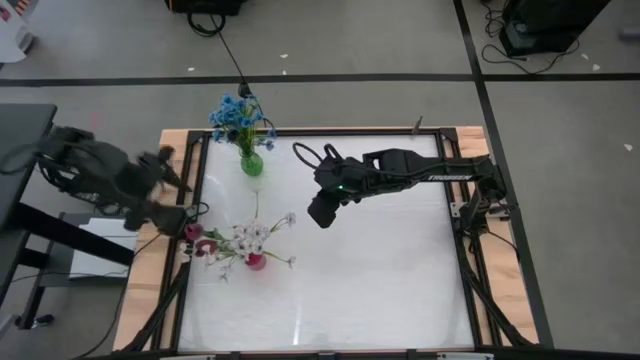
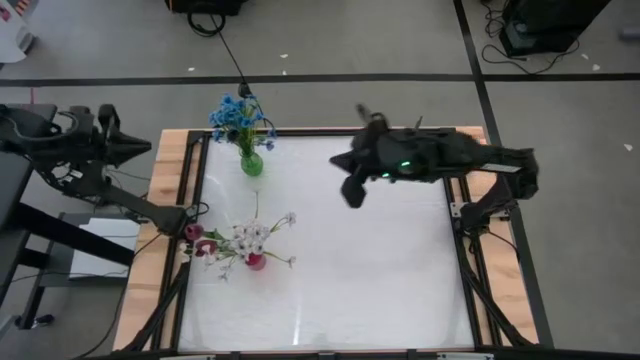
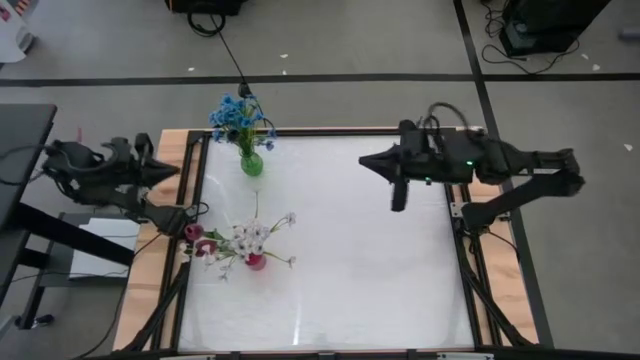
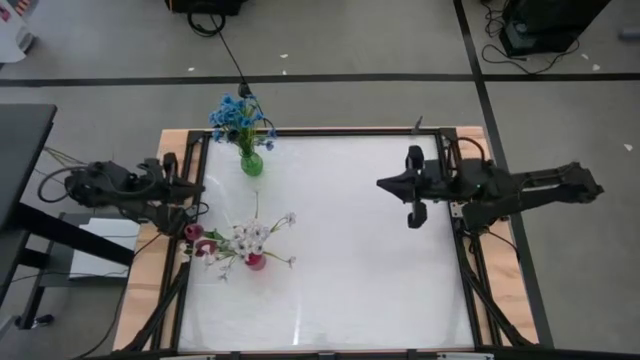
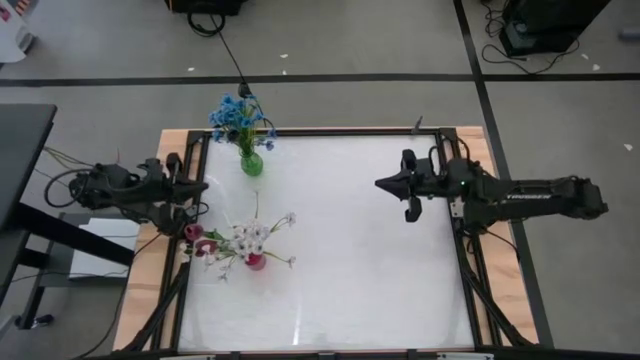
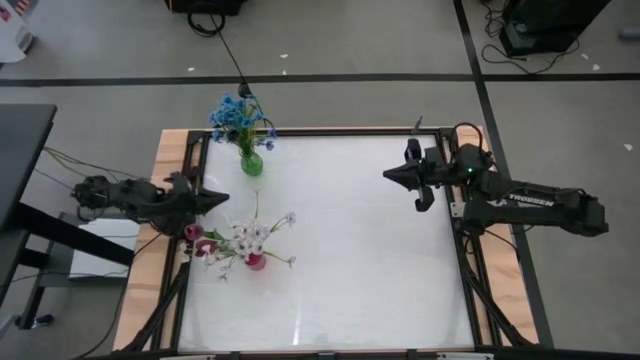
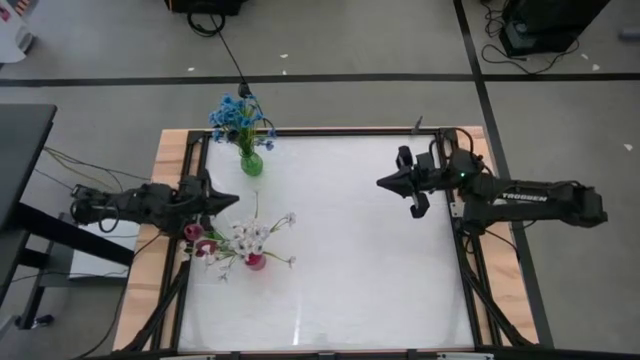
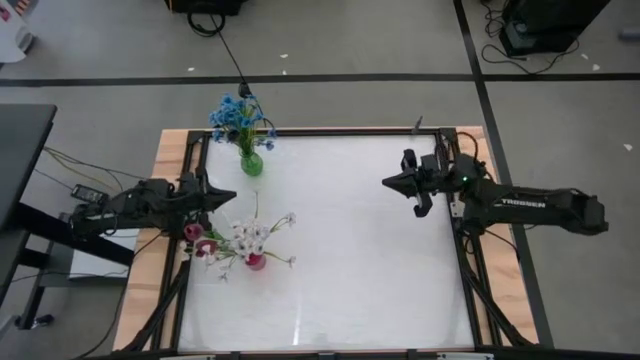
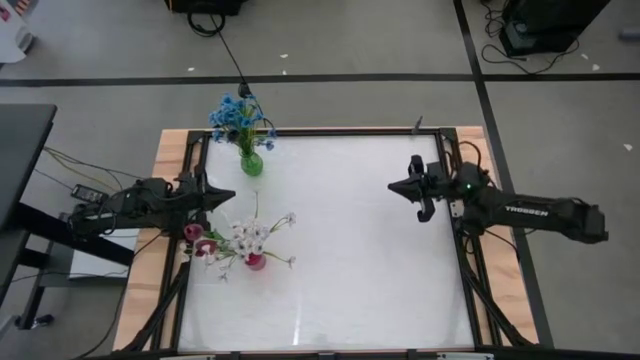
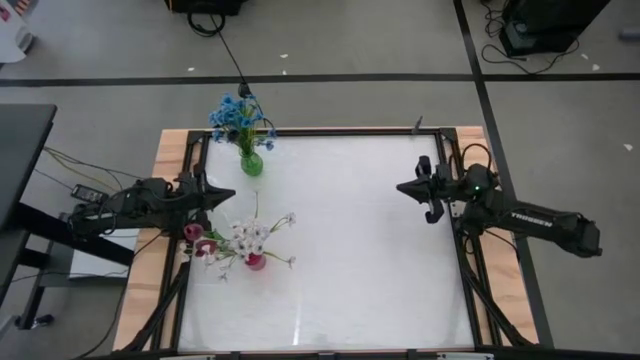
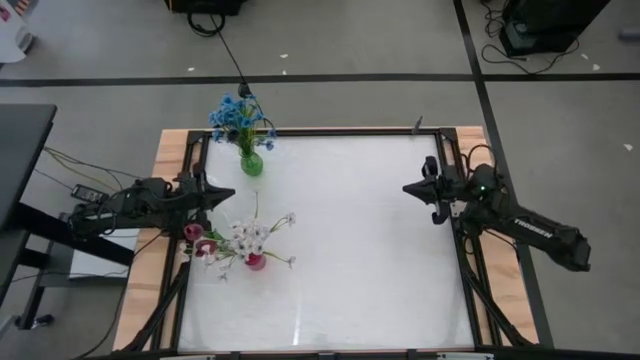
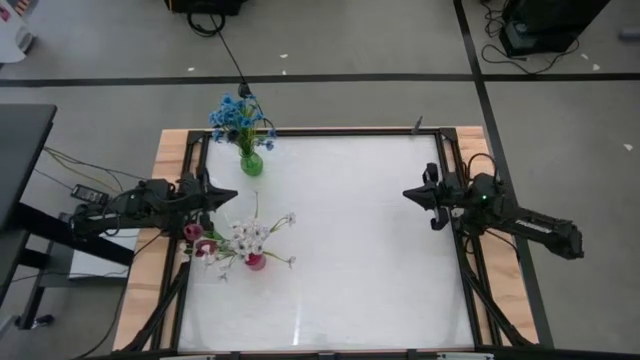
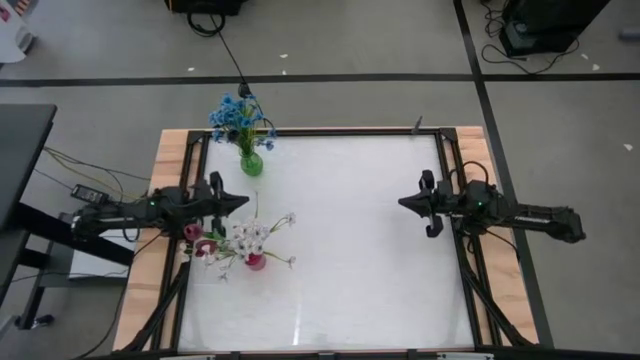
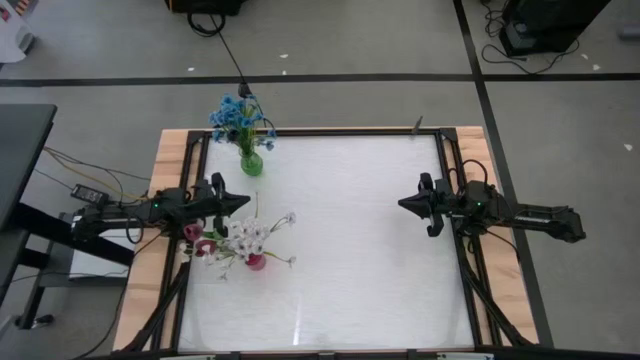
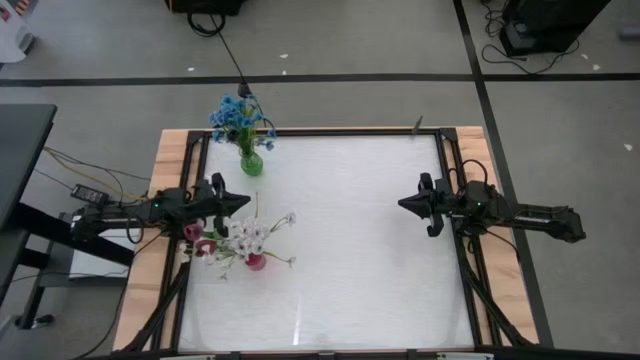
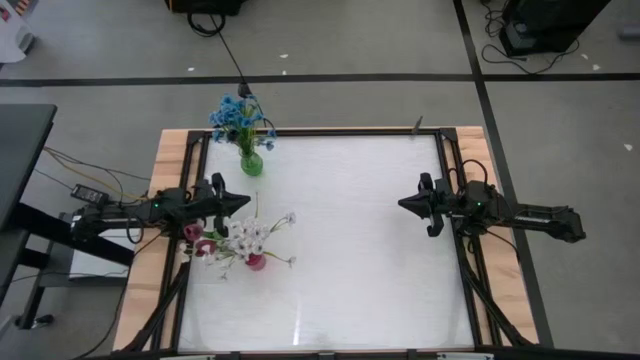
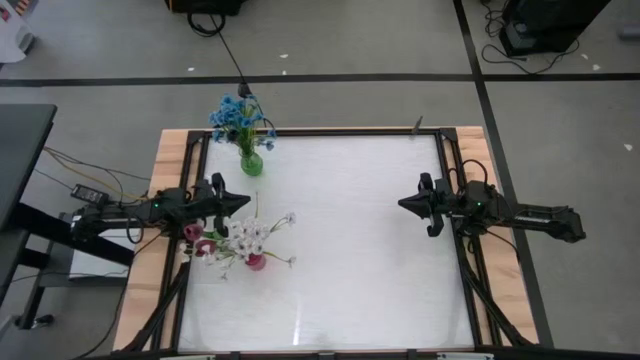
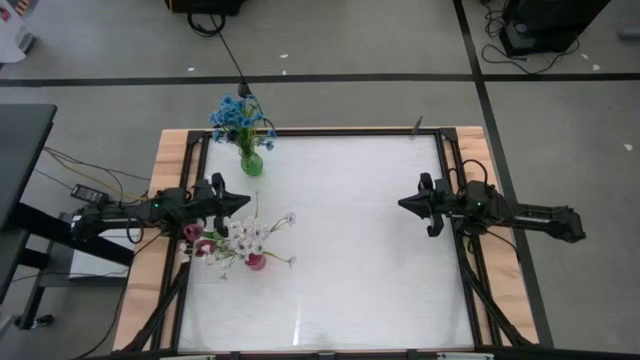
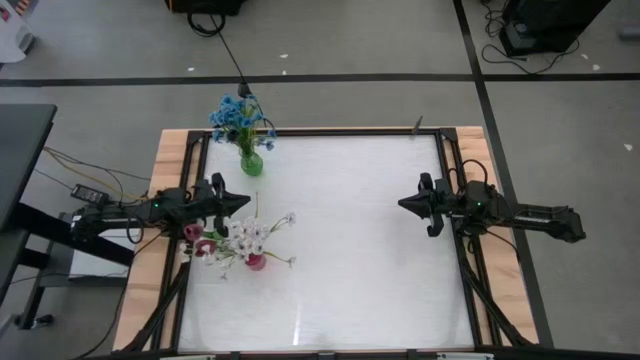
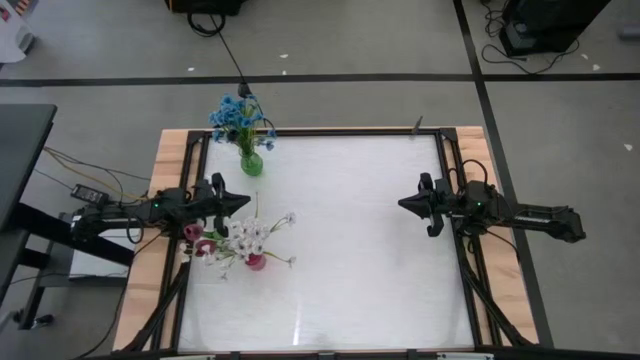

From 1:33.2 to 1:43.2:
Task: Sort flowers into vase by color
Return to Home Position

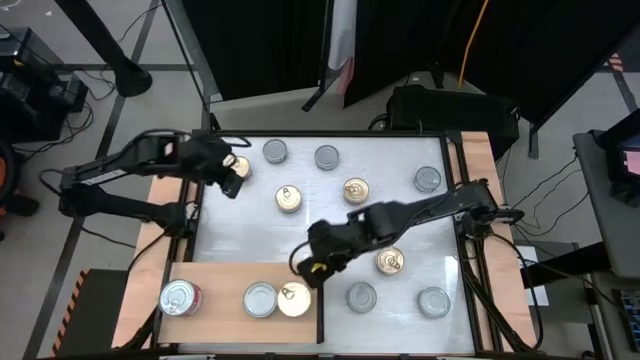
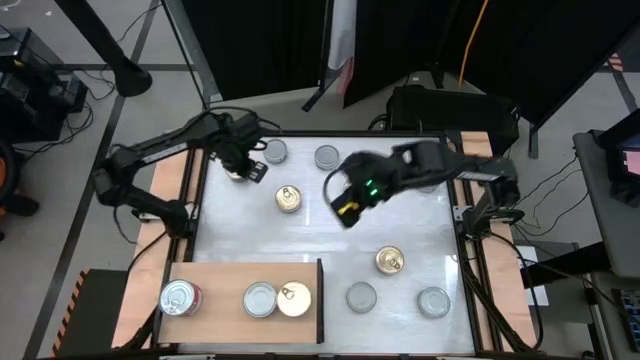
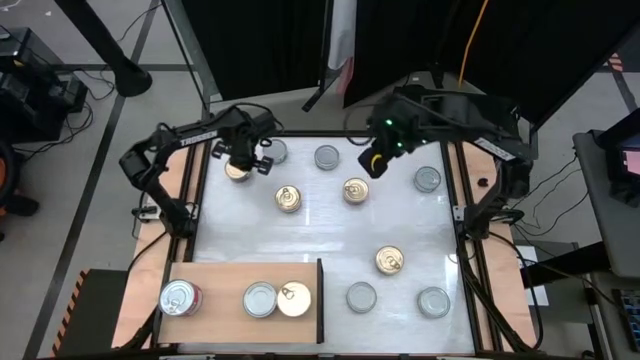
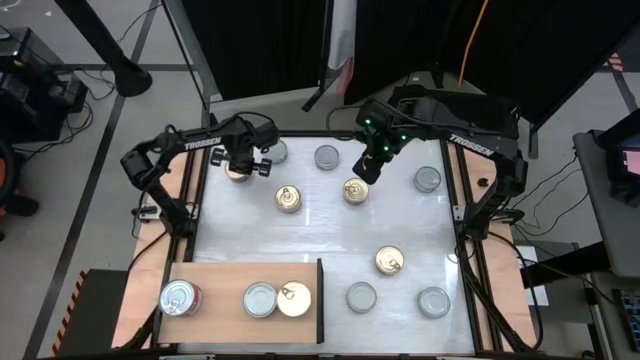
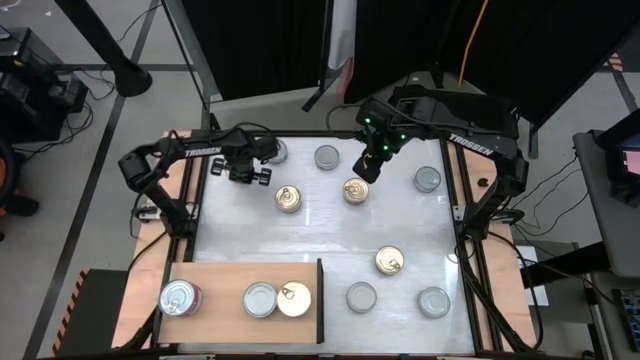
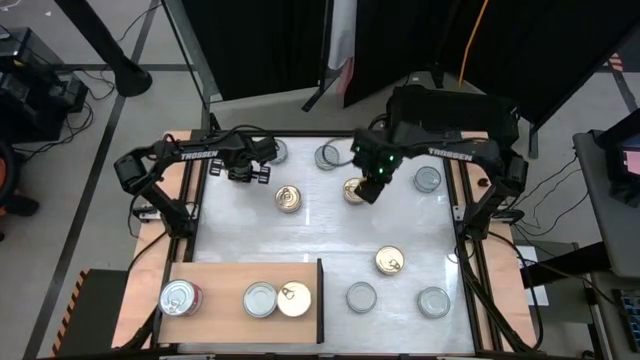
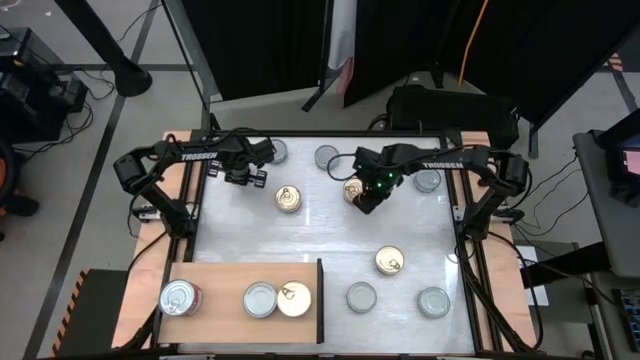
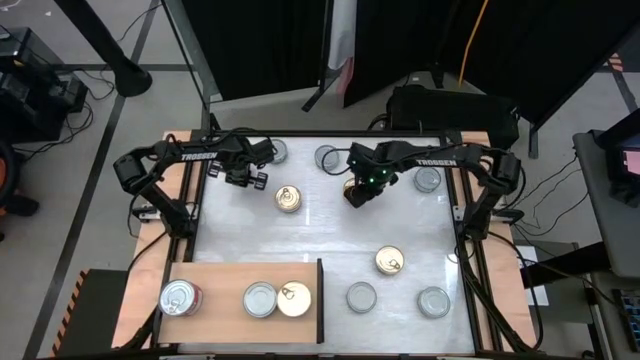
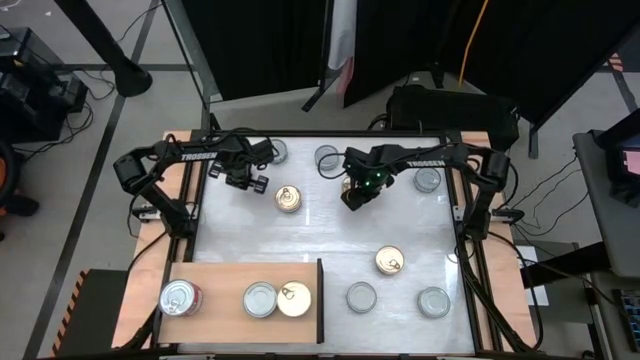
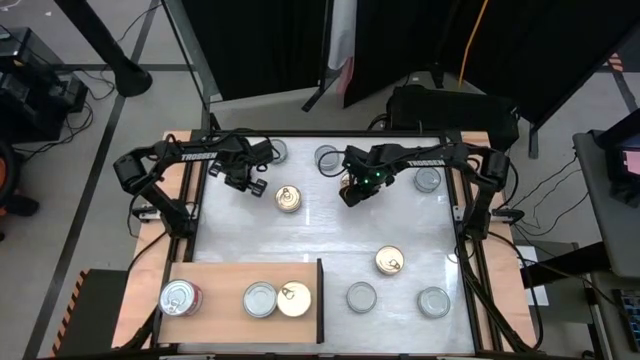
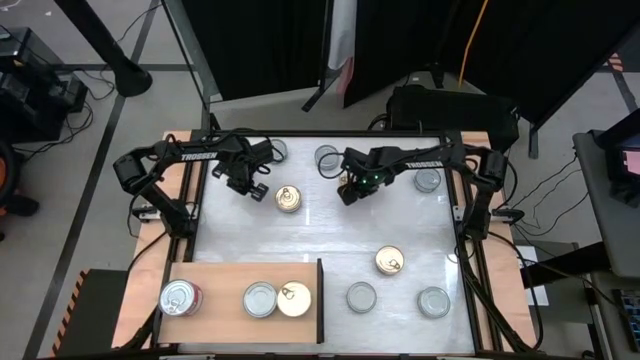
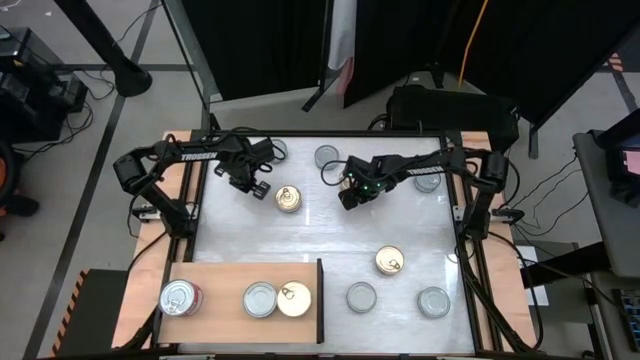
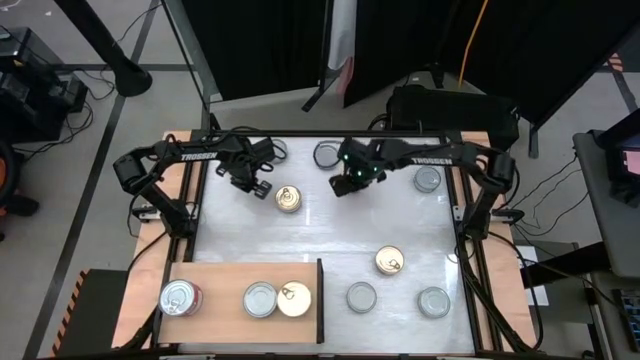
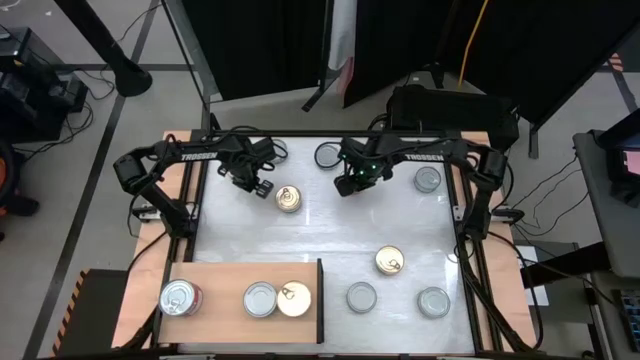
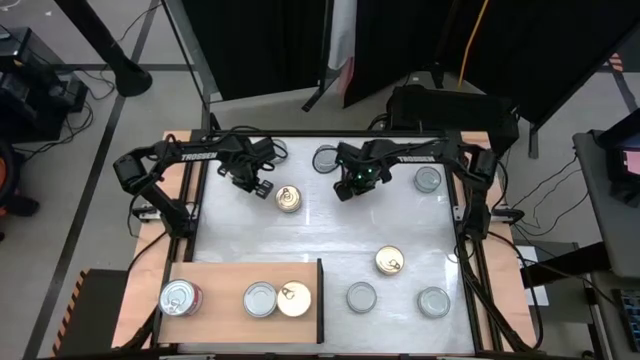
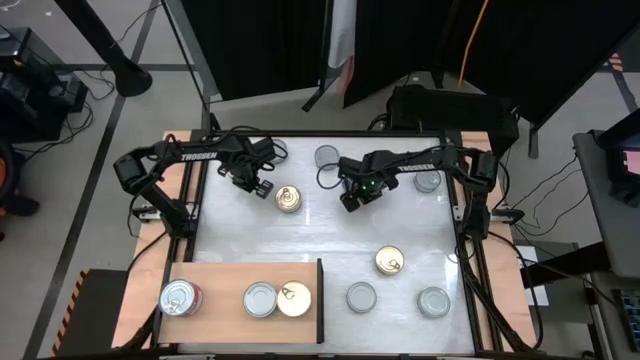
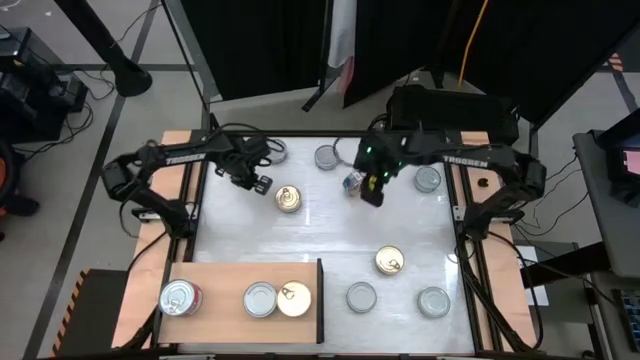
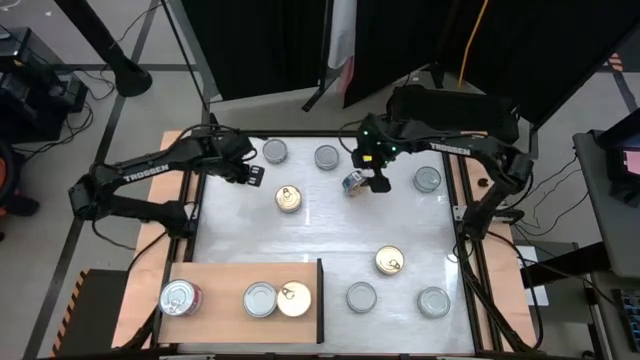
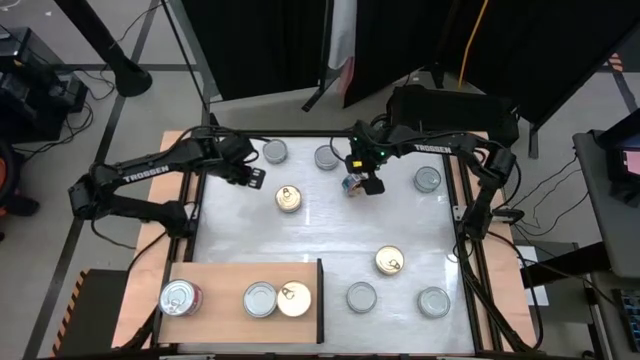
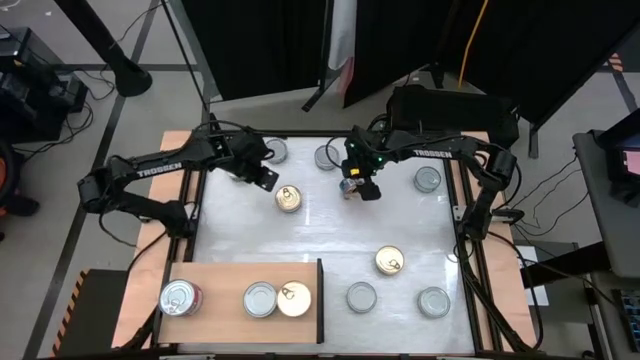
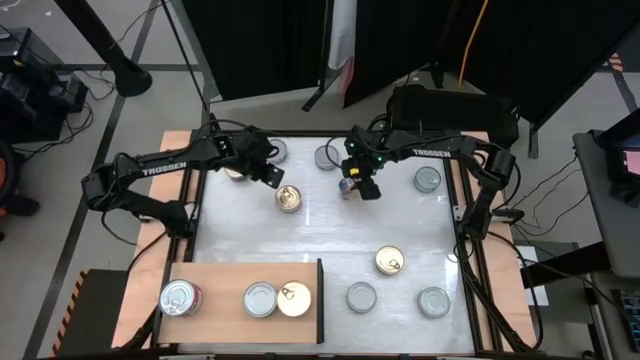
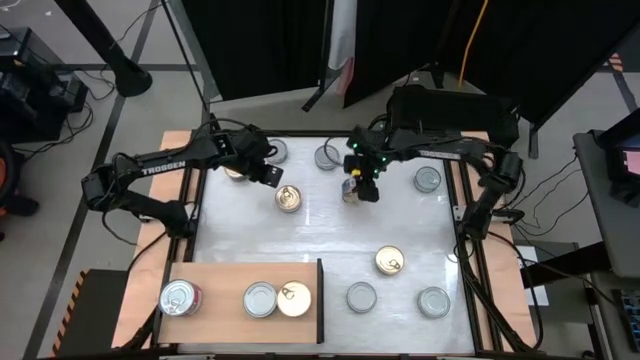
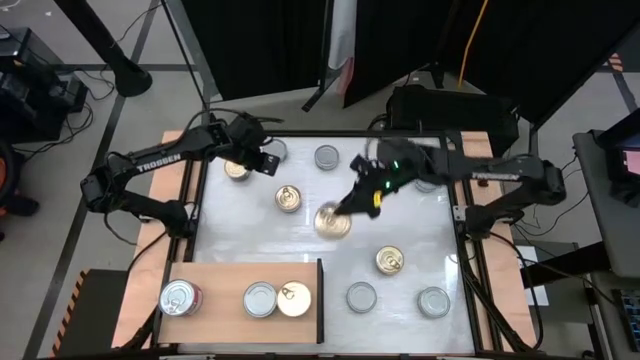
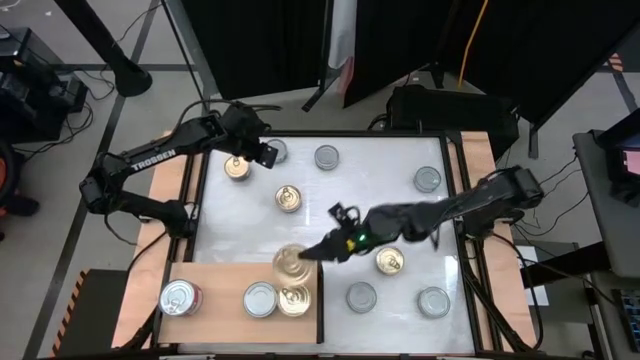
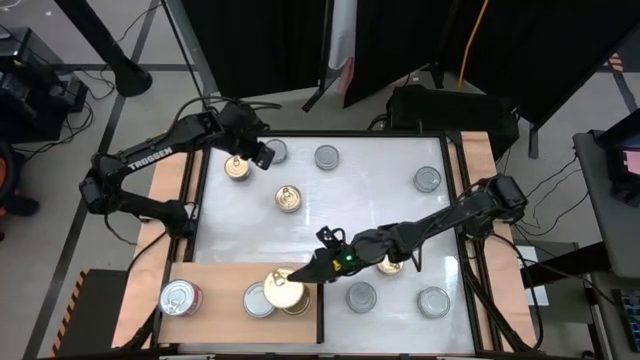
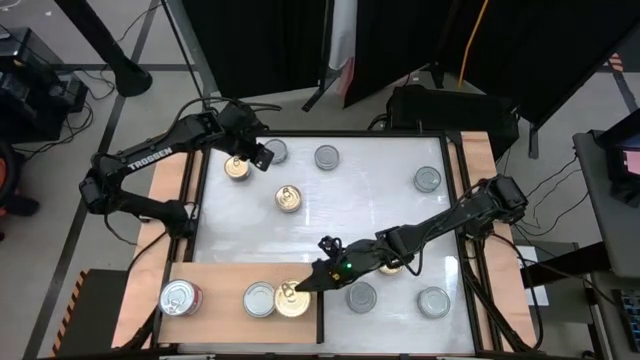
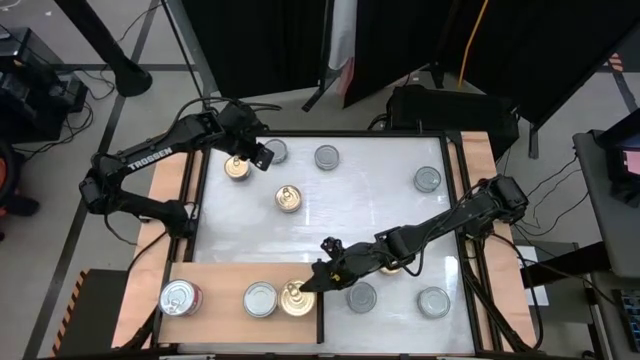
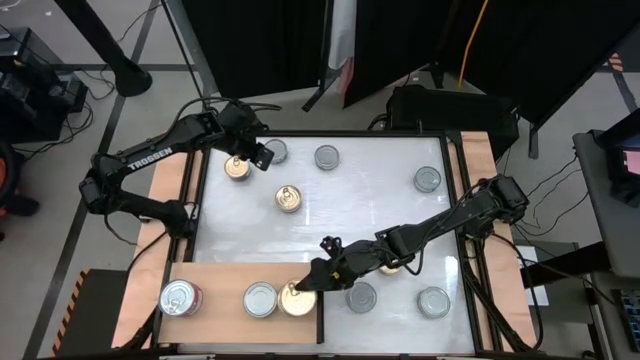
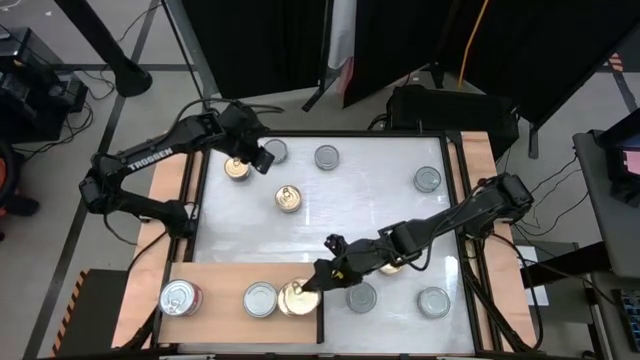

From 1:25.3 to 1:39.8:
Task: Stack canned seafood by type on shelf
Stack the blue pink tuna can on top of the other blue pink tuna can on the shelf
